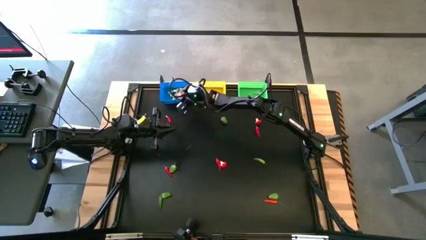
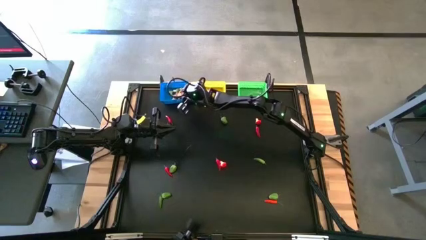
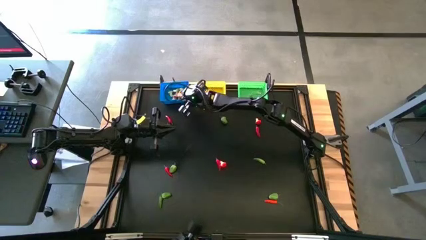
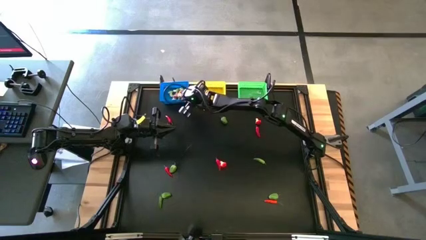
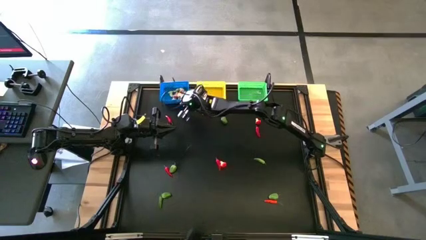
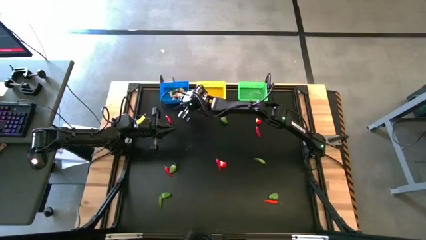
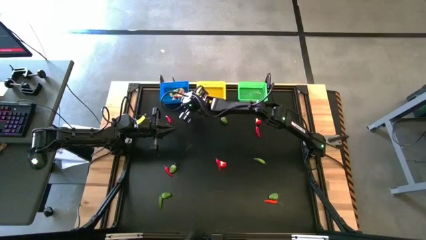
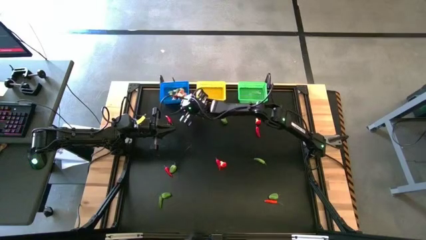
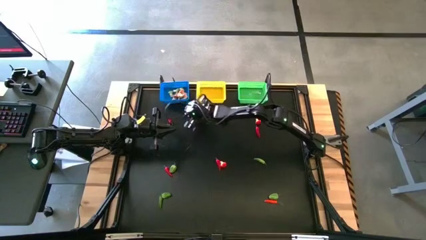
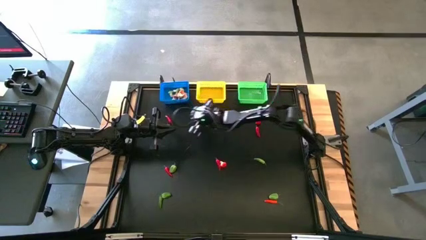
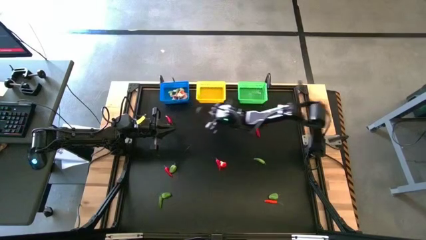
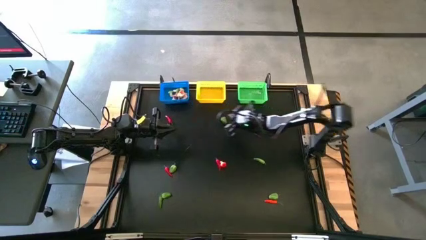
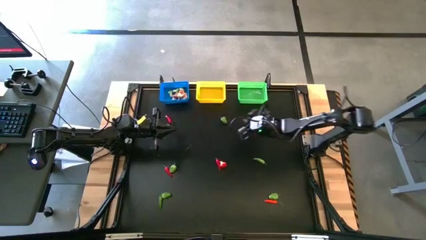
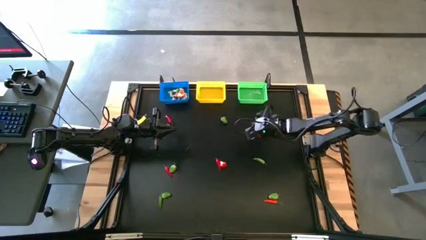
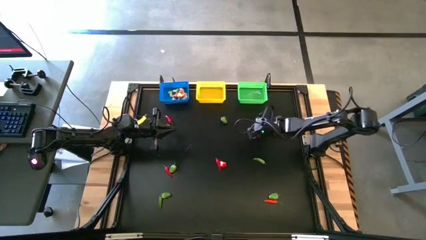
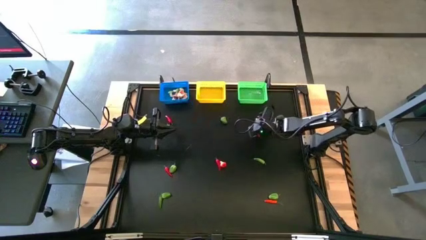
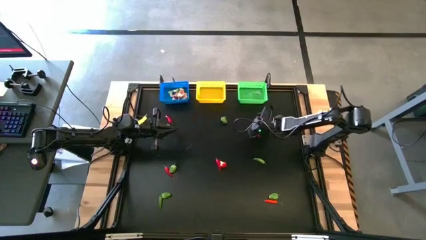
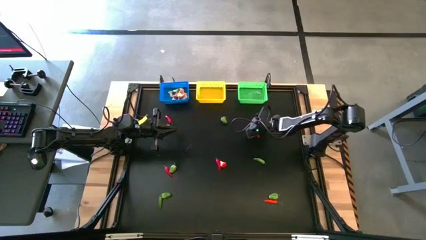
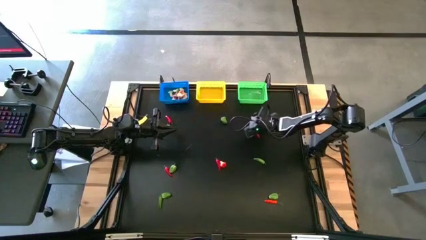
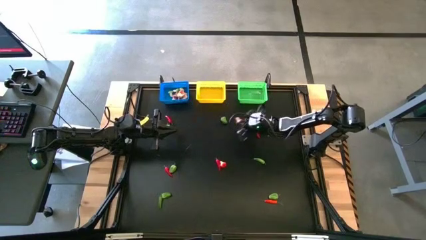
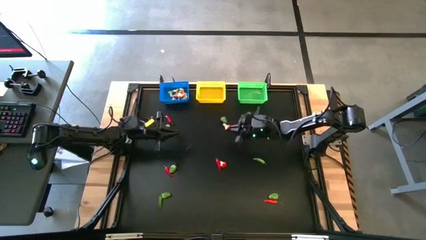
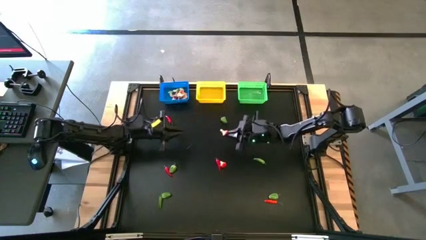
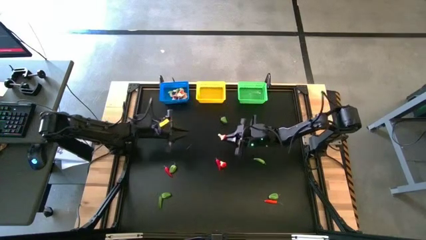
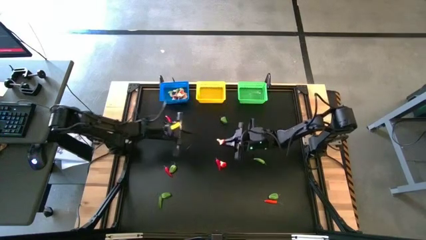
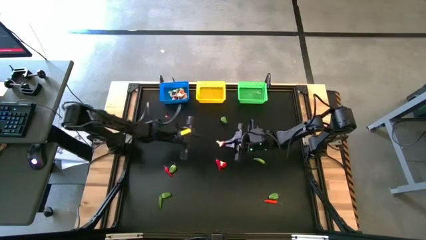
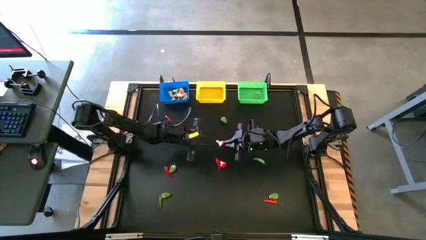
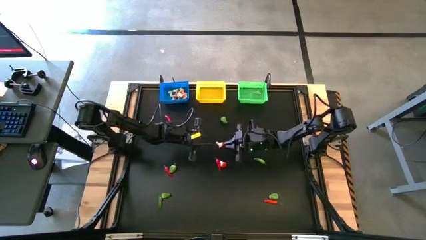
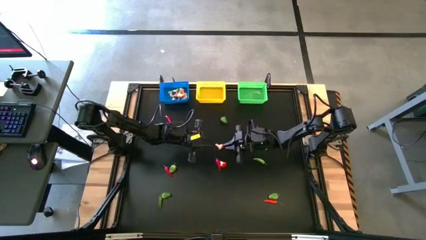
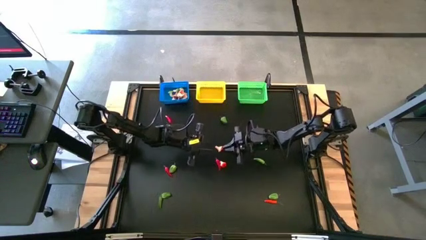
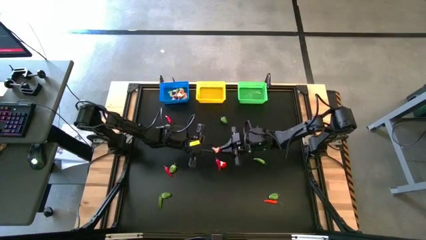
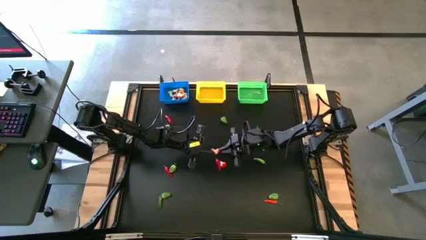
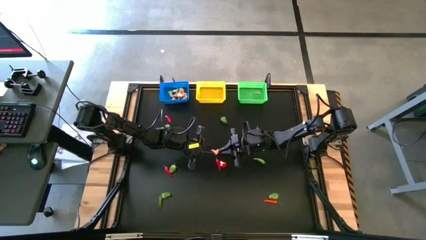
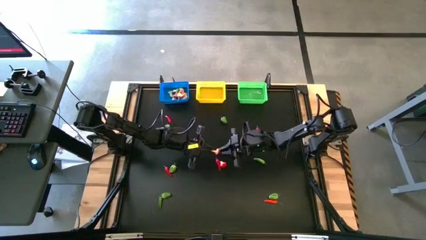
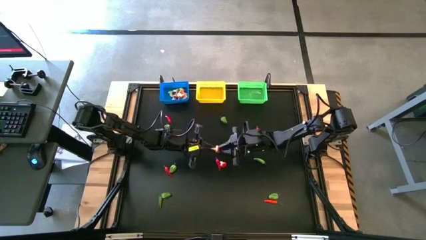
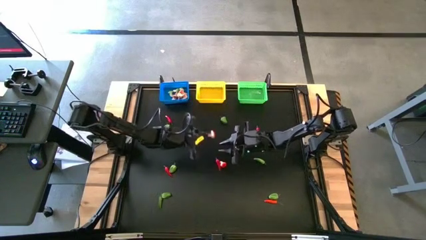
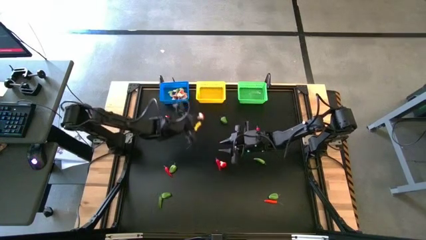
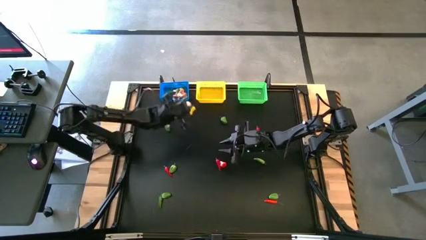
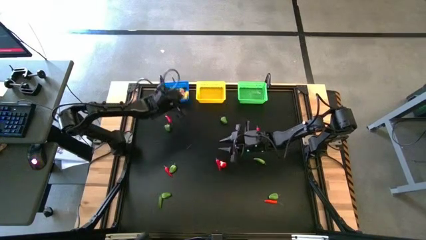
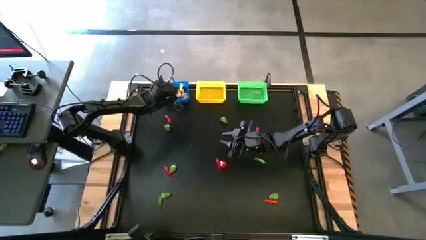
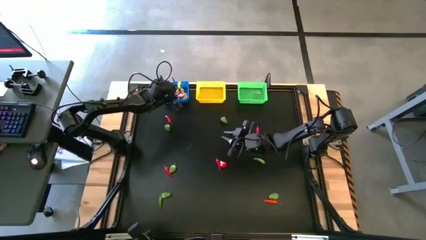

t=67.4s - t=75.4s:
Task: Sort produce into baskets
Put the red mushroom into the blue bin

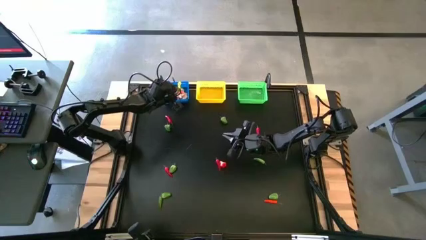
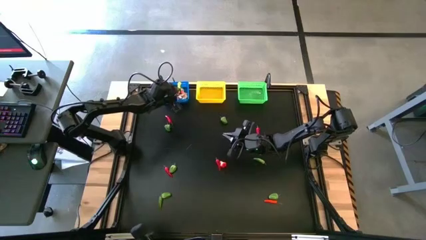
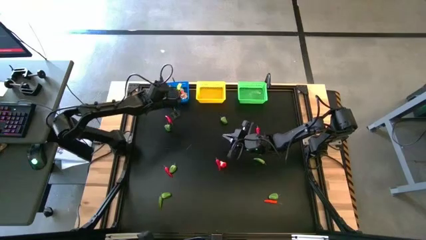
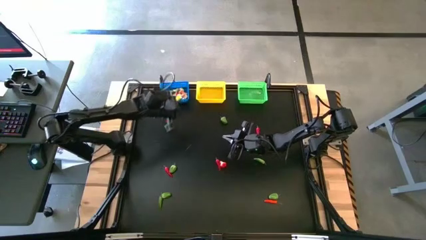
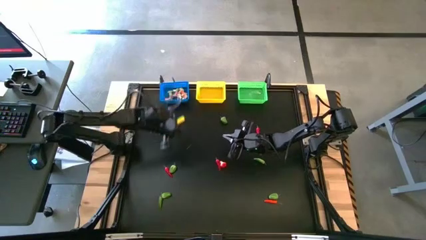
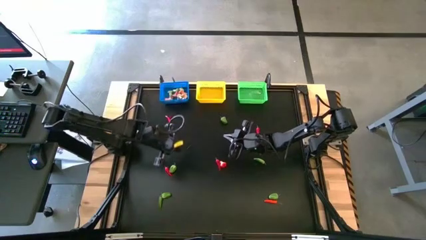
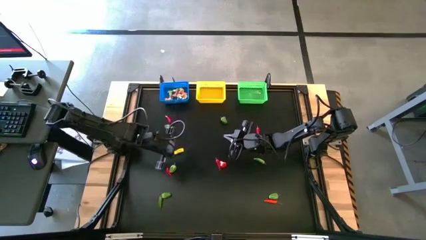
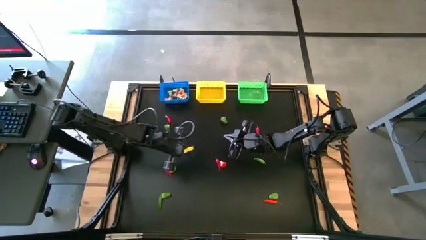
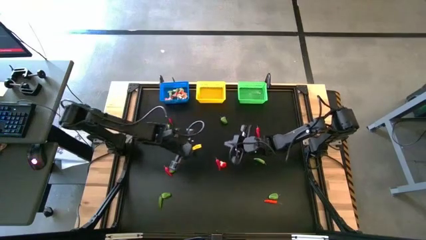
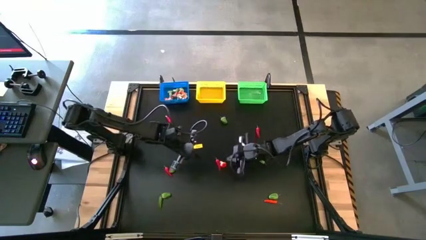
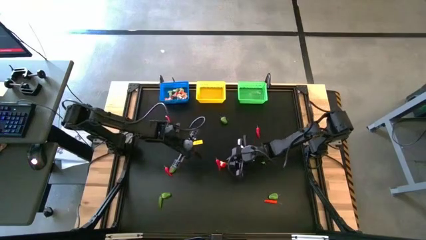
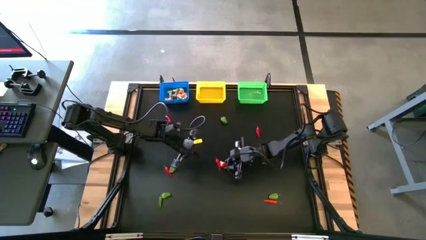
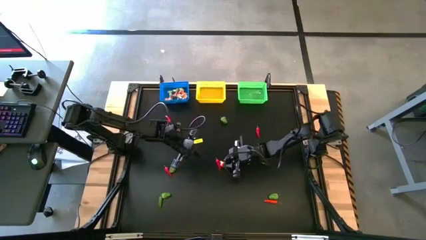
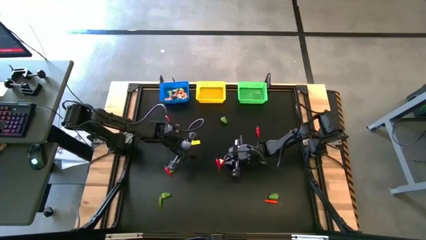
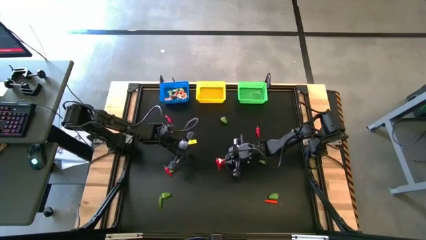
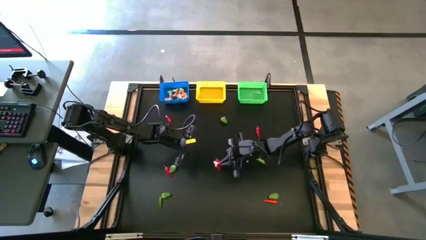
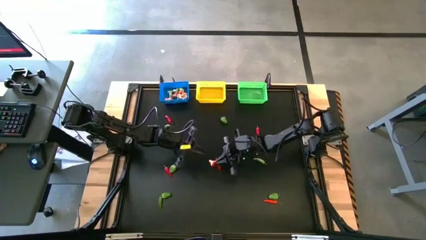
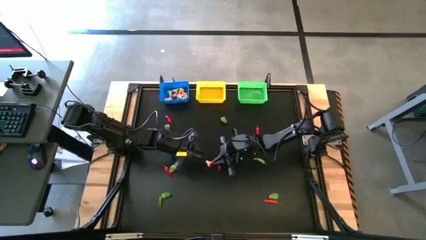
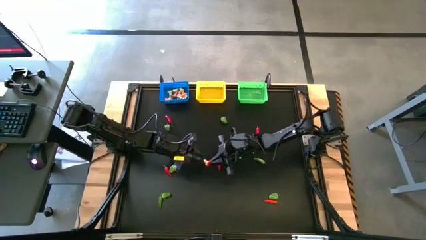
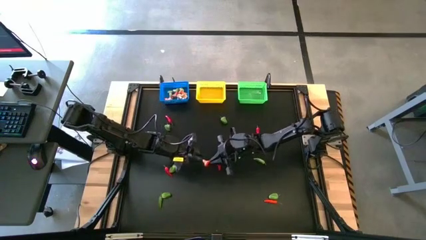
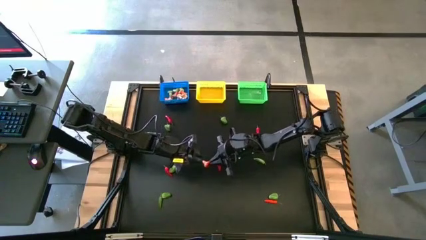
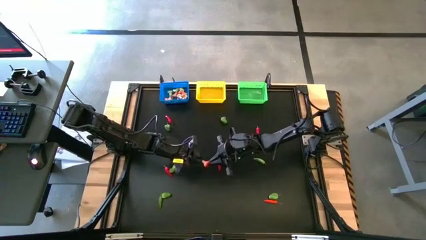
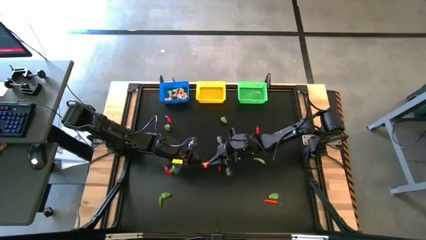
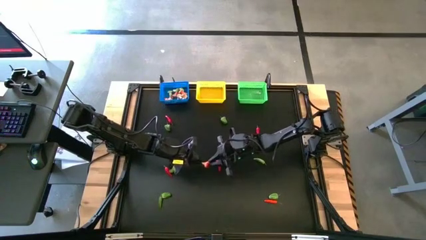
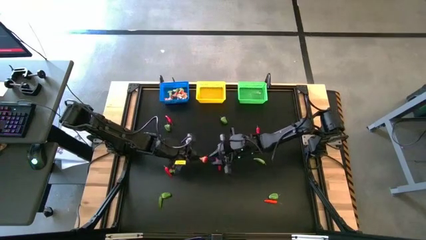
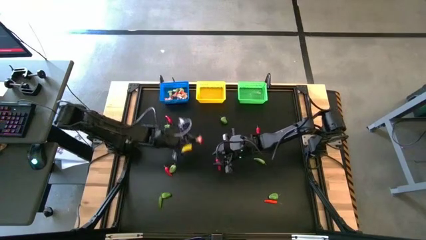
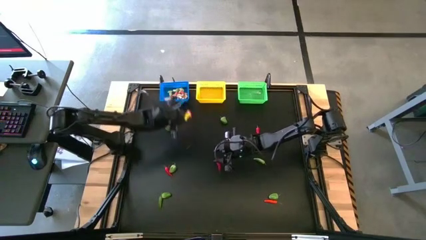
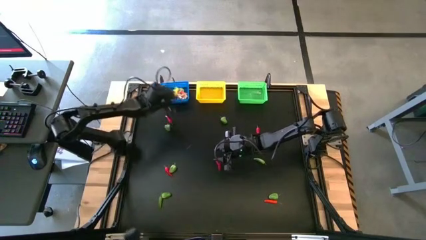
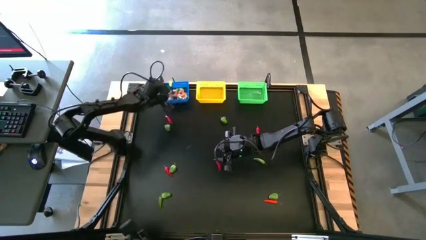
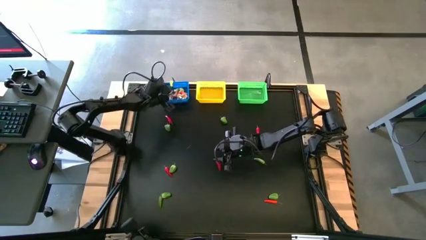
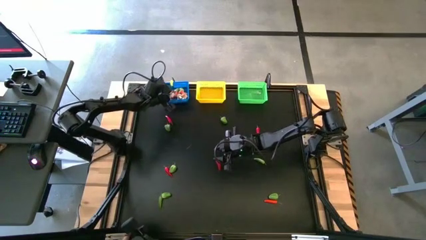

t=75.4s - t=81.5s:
Put the red mushroom into the blue bin

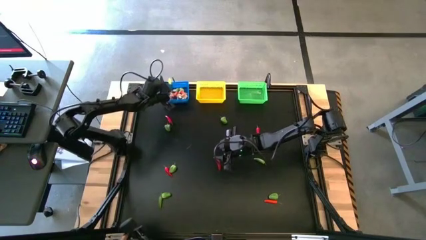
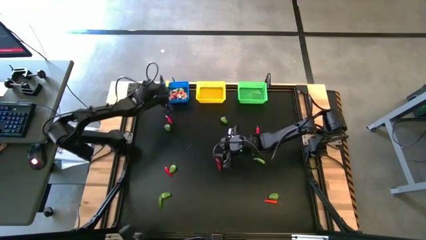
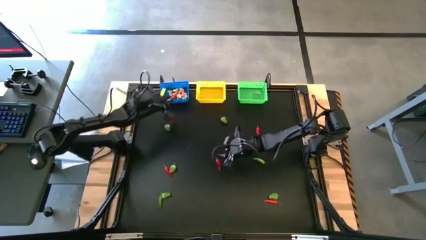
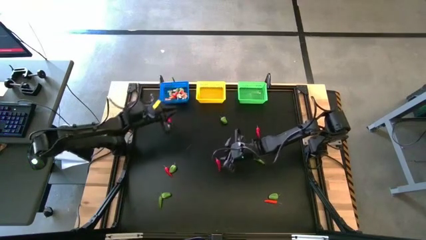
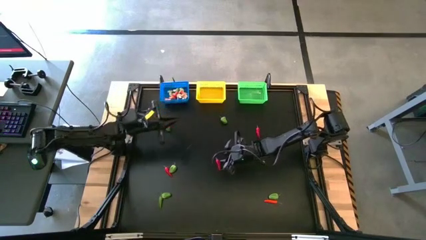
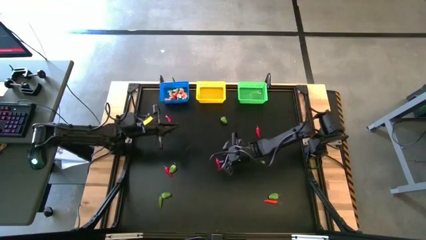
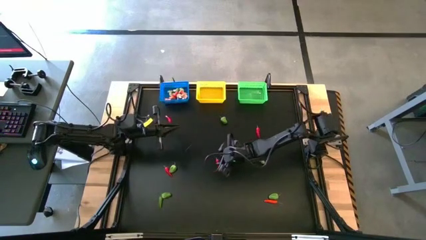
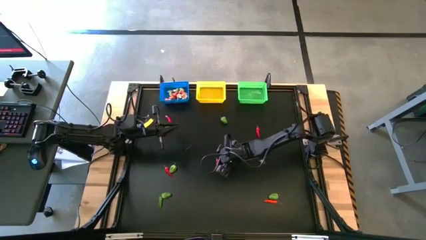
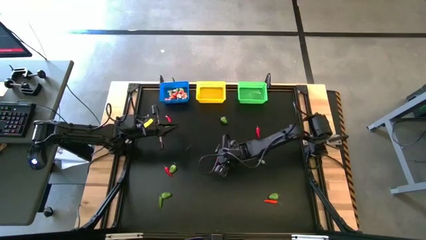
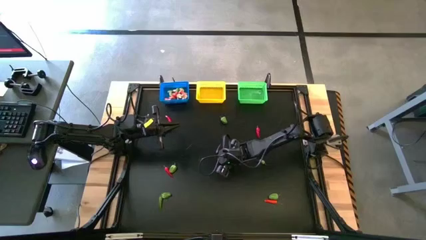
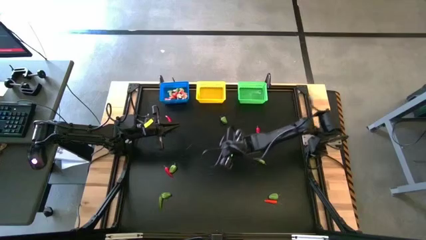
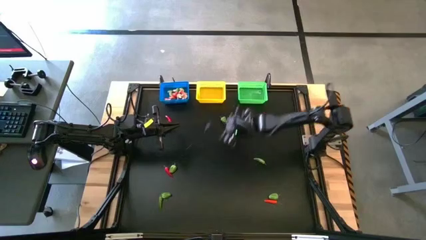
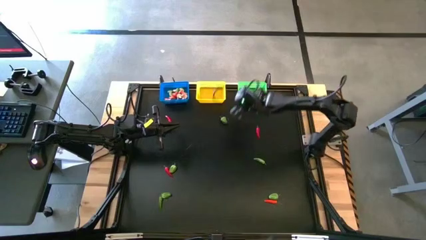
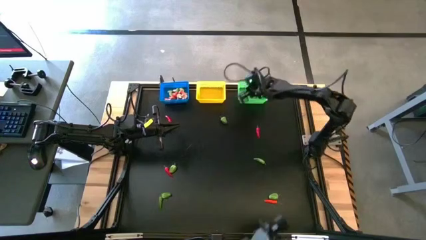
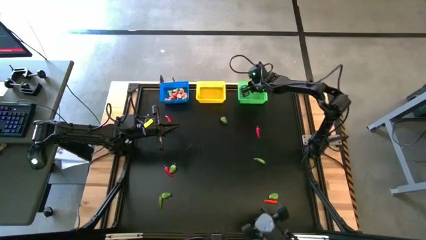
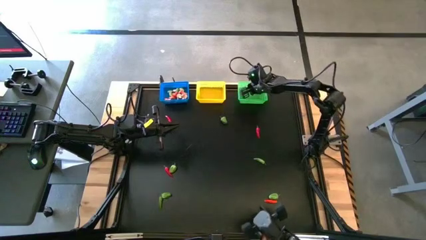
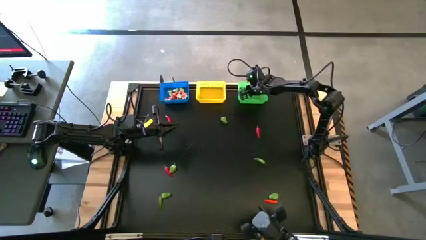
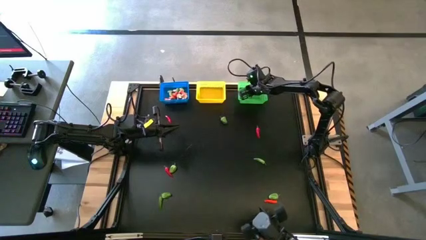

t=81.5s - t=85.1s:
Put the red chili pepper into the green bin
